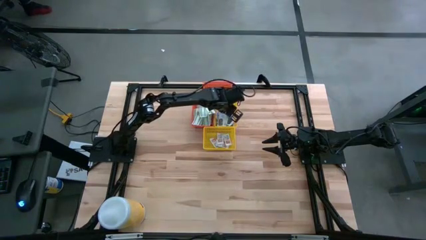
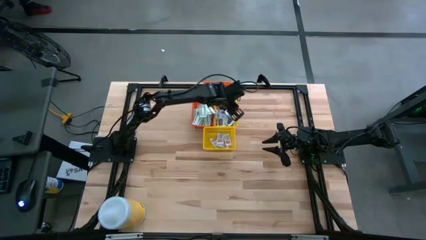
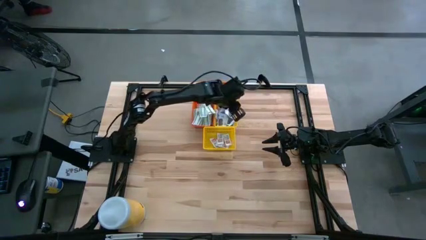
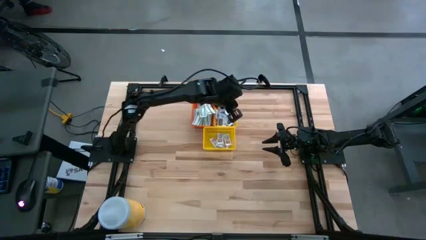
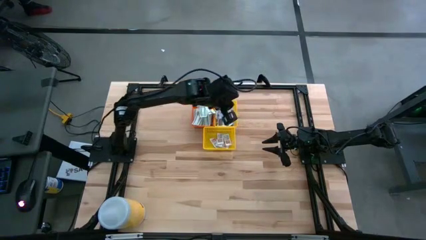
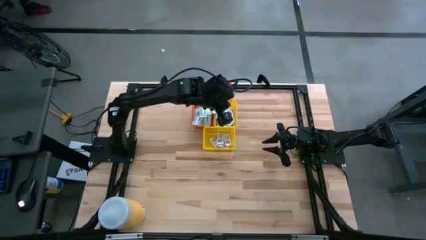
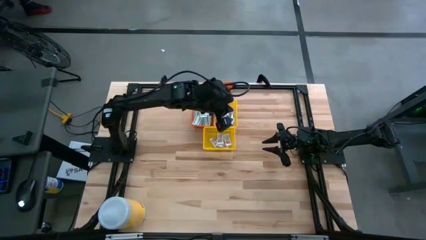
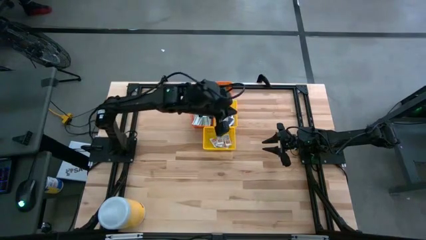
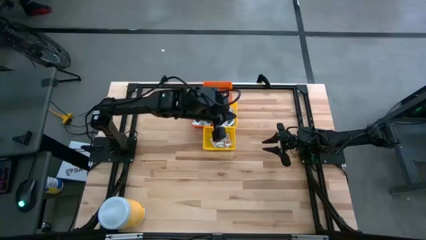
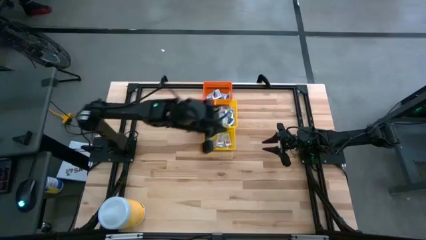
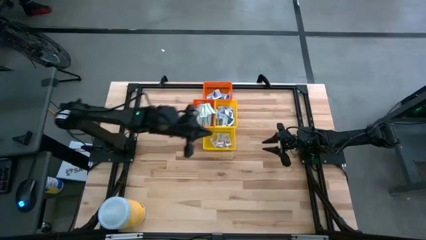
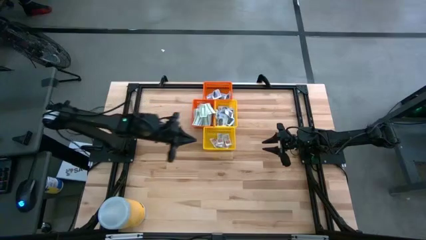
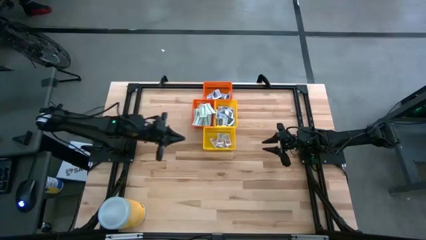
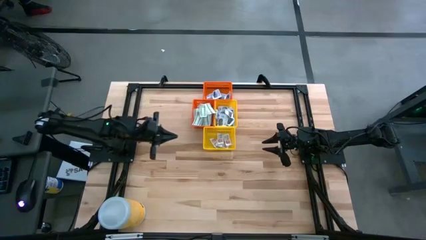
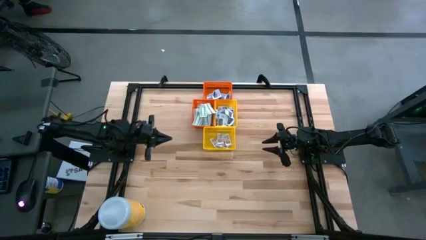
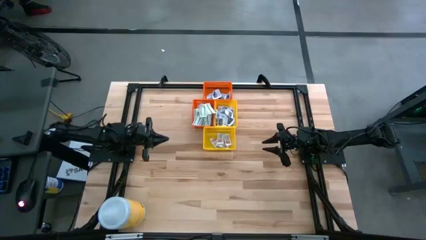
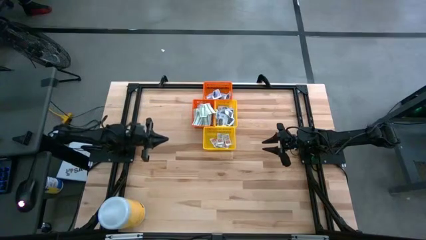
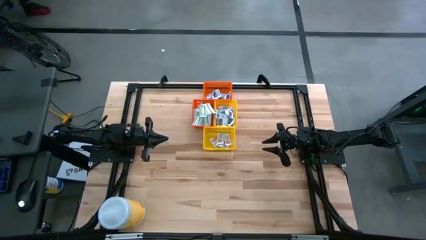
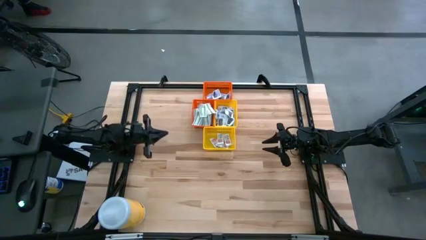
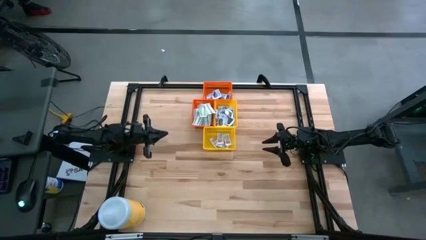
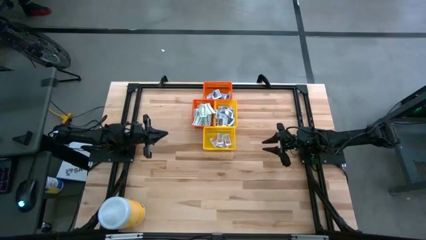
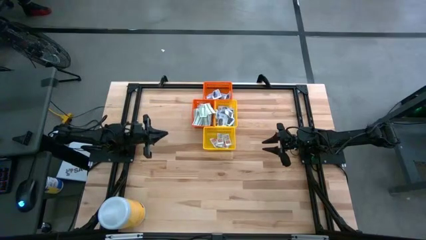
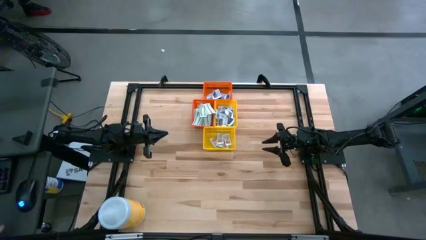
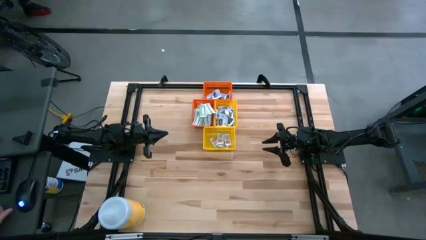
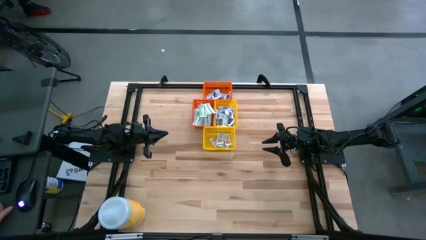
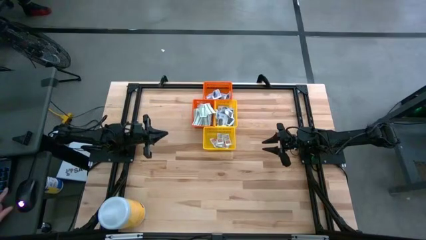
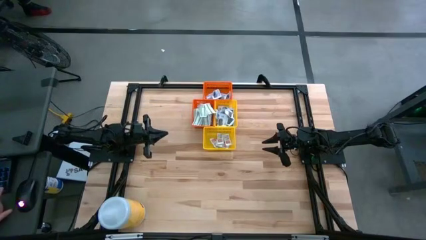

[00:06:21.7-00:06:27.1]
Task: Pick & Place First Aid Supplies
Return To Home Position

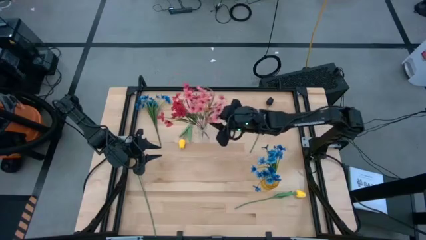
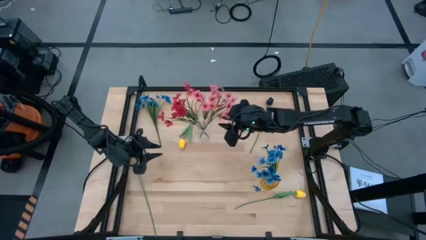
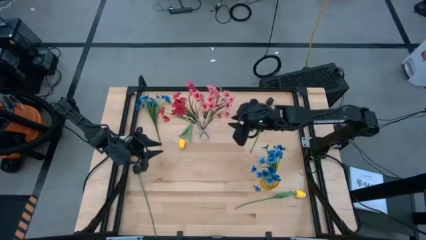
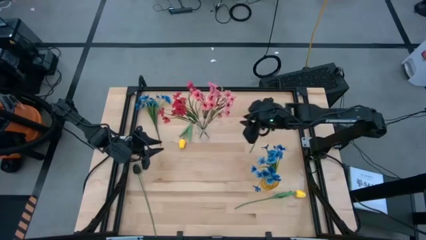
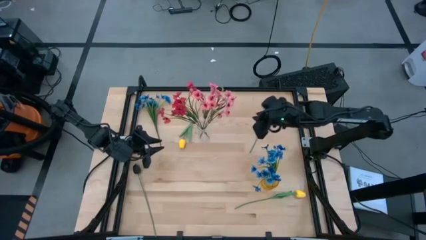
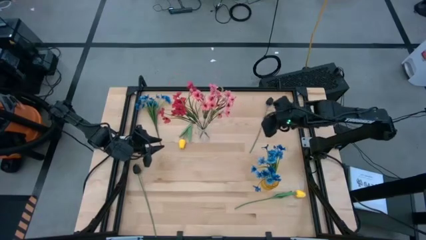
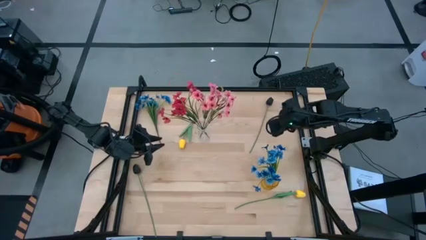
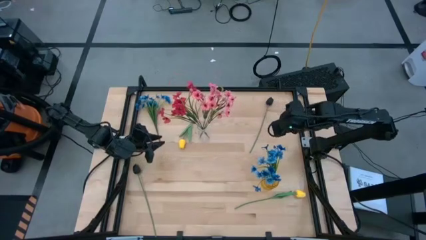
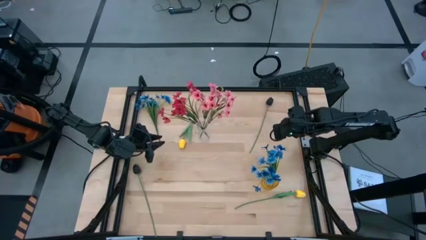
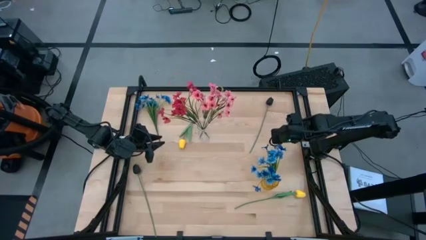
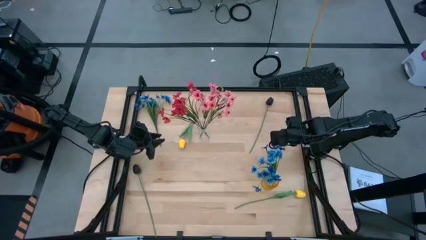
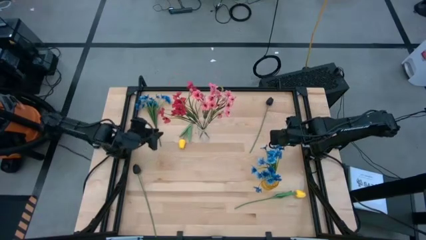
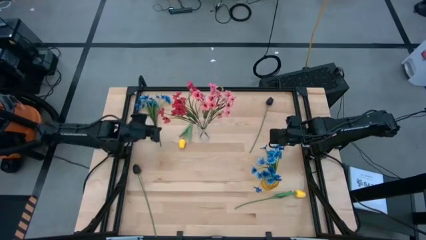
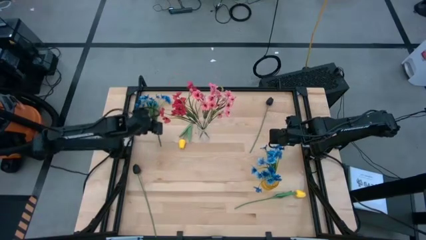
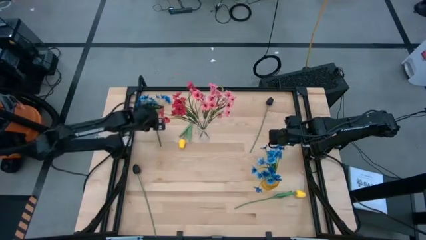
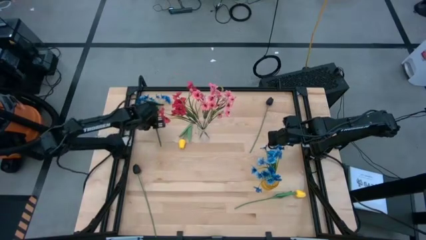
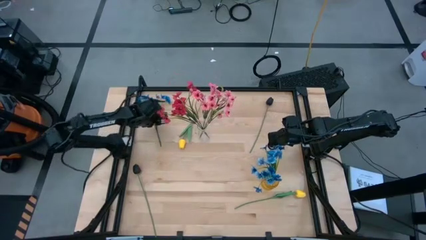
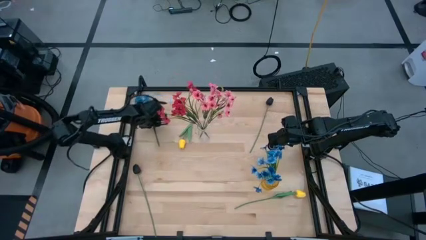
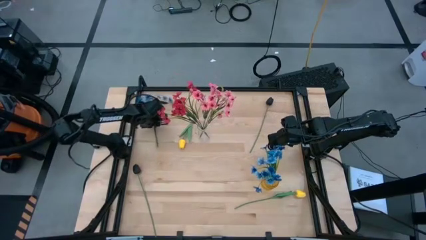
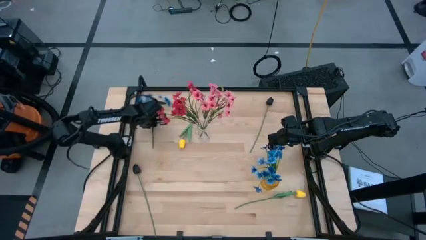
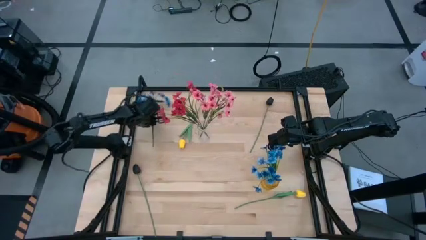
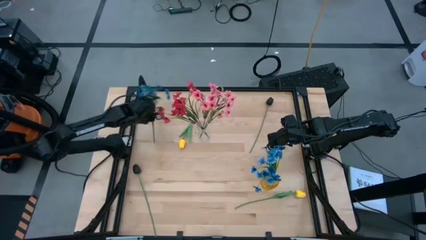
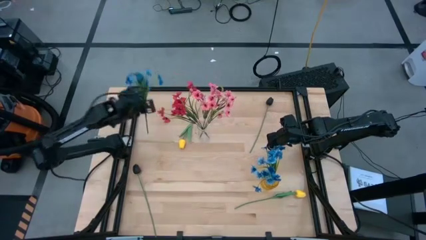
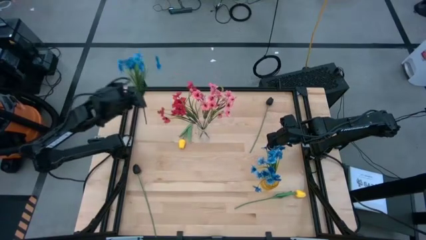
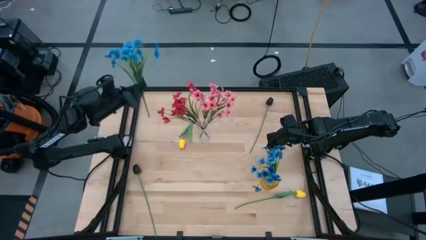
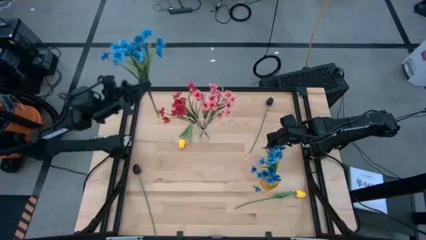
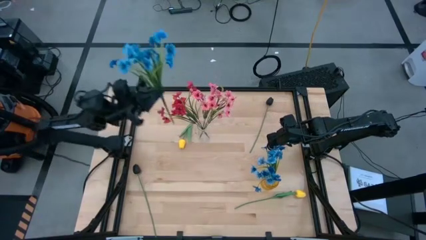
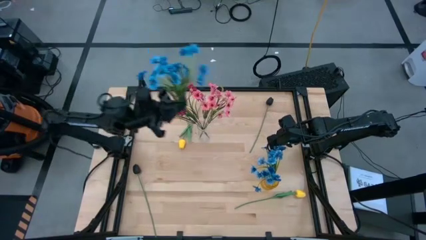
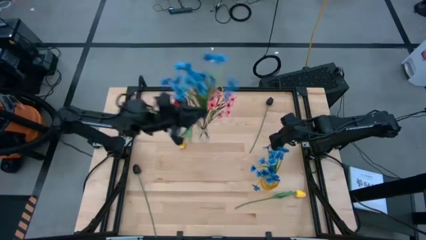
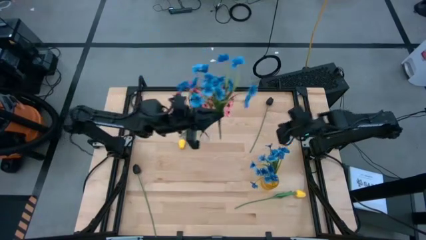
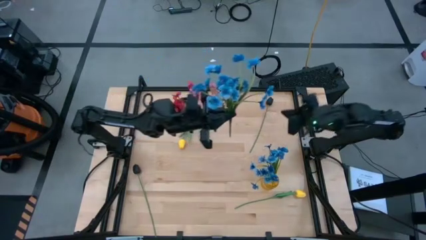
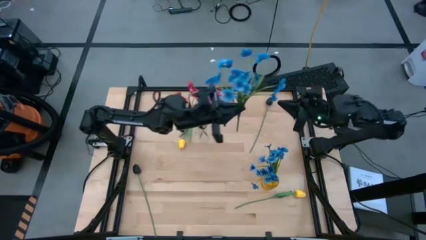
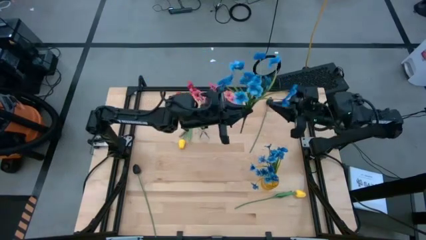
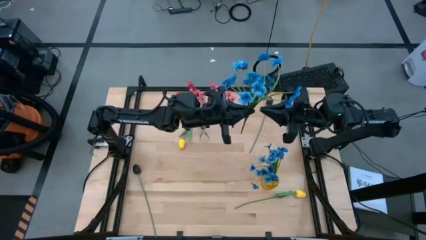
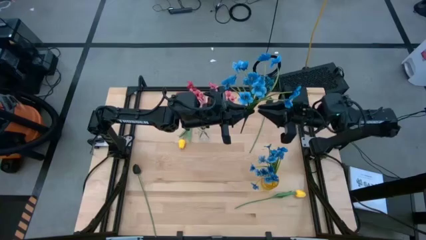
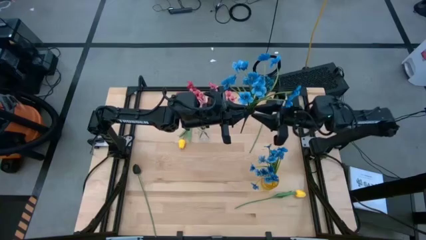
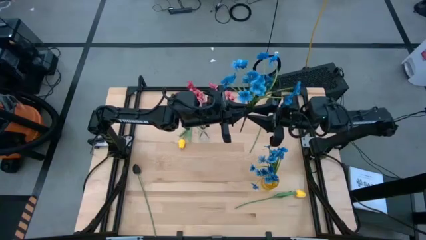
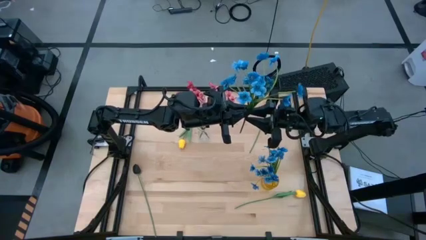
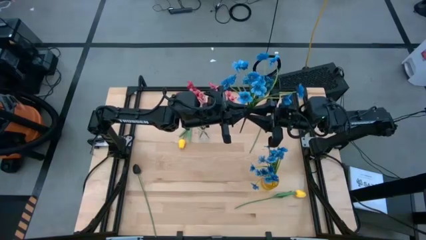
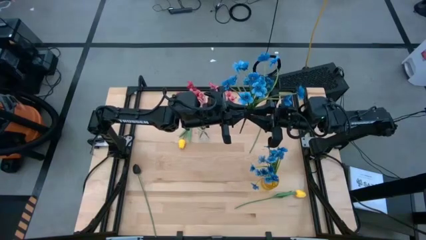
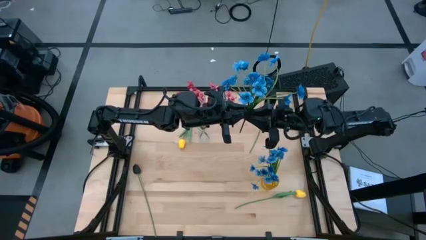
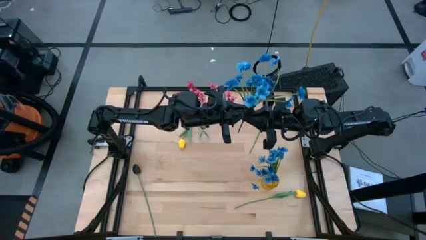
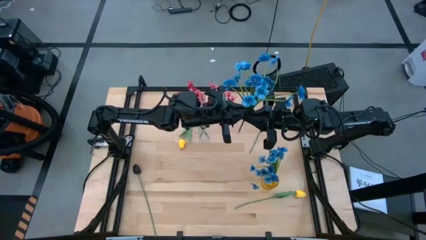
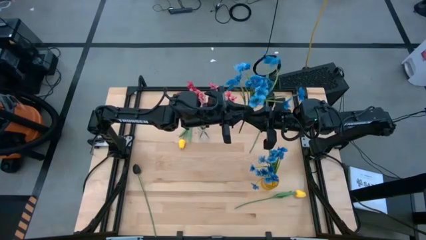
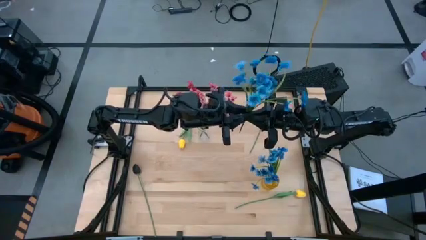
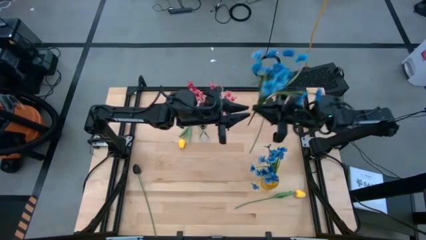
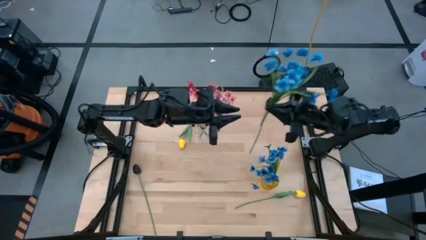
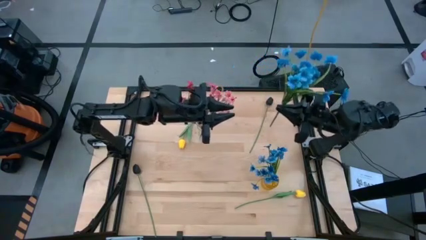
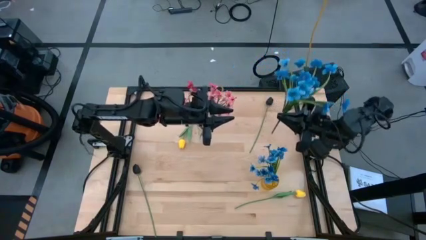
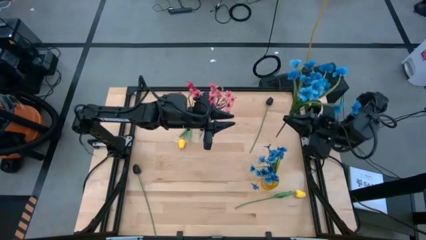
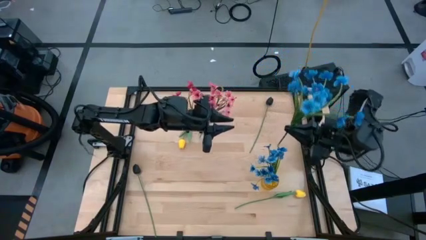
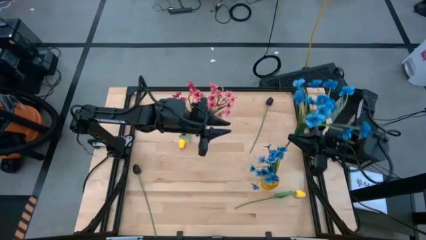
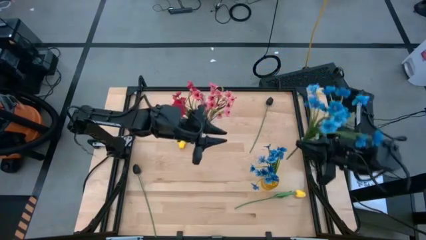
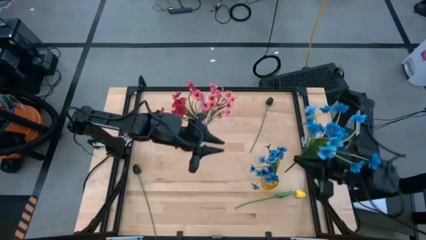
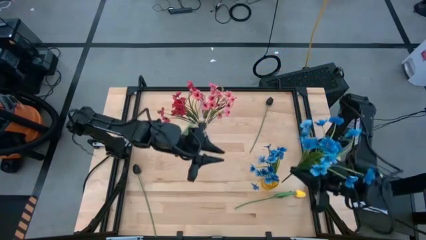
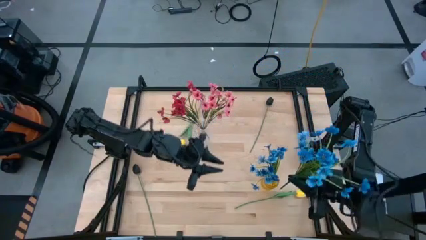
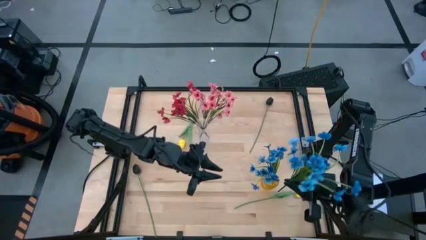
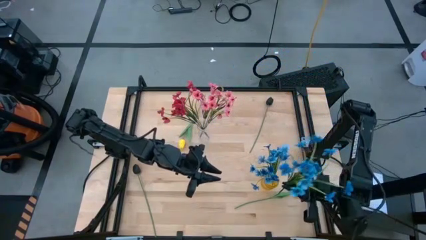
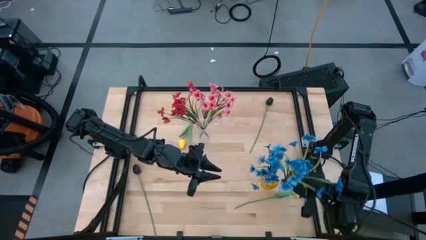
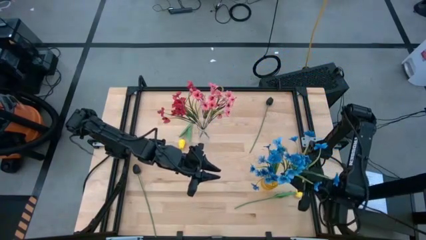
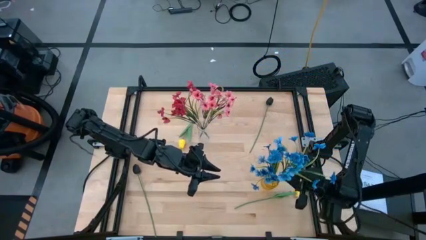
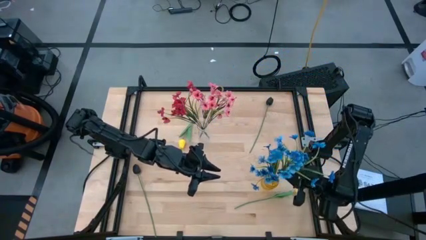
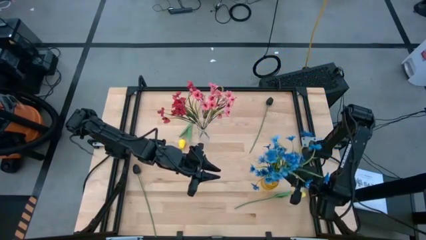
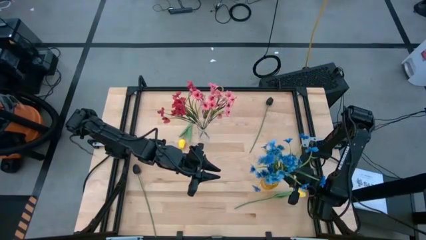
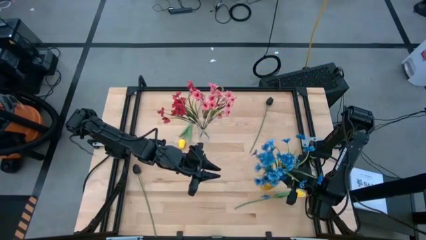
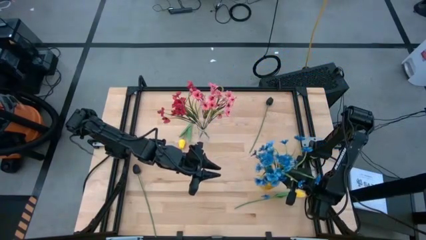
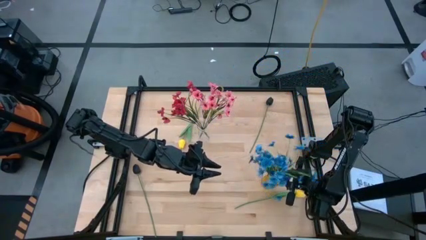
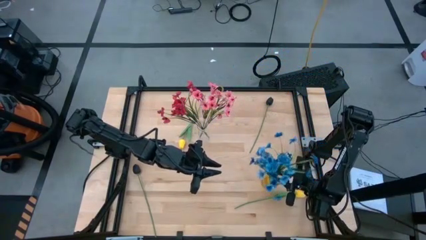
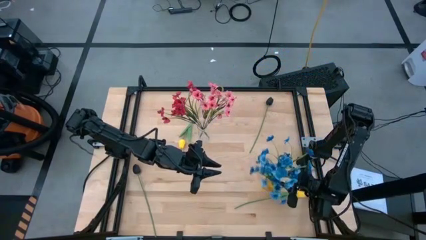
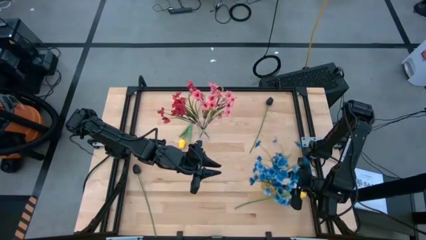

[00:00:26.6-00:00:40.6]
Task: Sort flowers into vase by color
Put the blue flowers into the yellow vase
